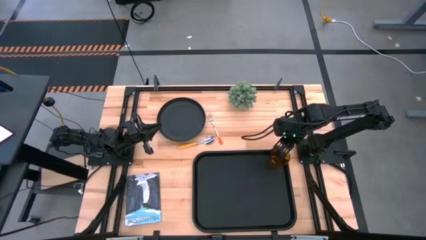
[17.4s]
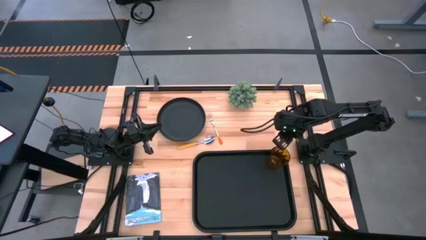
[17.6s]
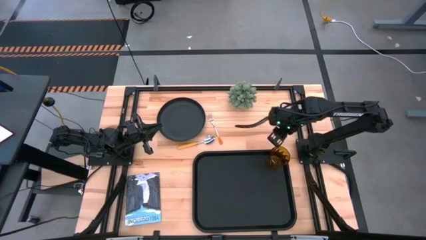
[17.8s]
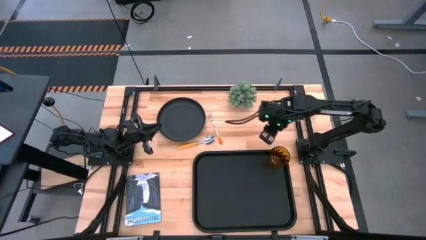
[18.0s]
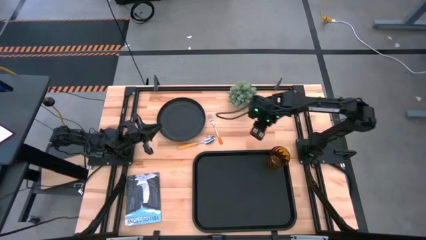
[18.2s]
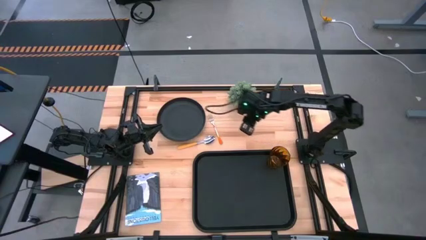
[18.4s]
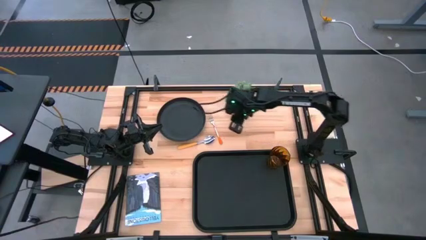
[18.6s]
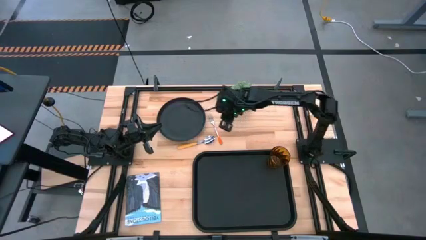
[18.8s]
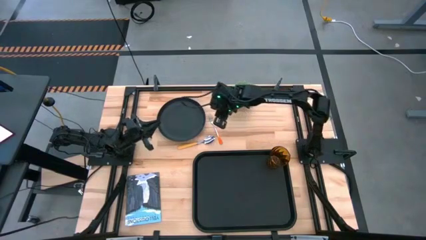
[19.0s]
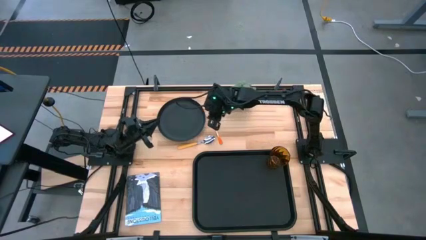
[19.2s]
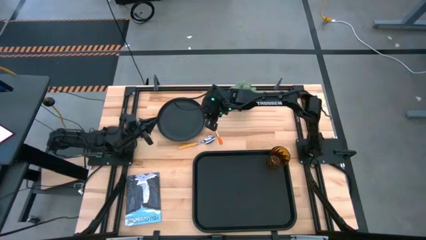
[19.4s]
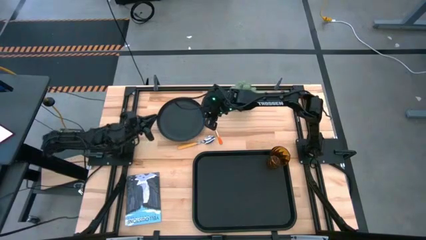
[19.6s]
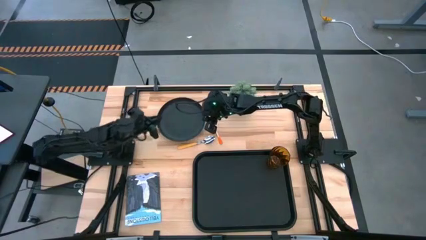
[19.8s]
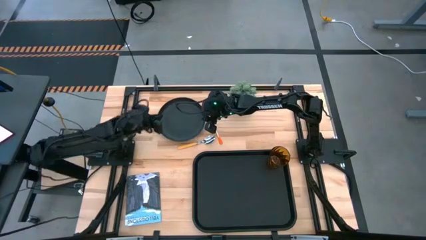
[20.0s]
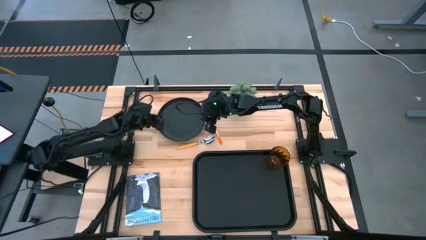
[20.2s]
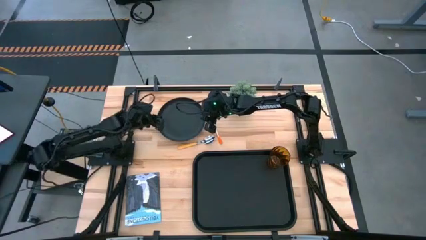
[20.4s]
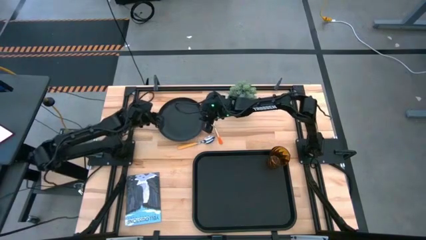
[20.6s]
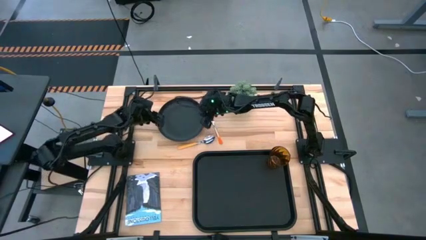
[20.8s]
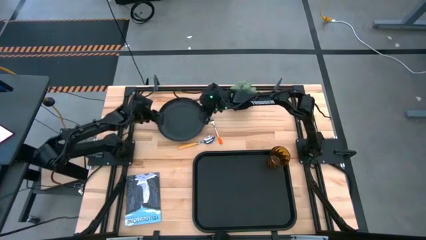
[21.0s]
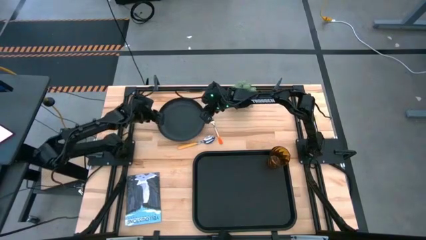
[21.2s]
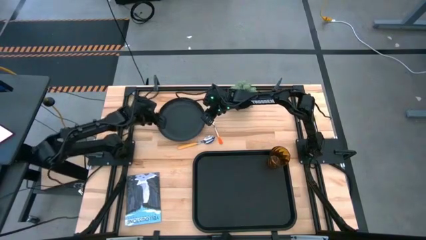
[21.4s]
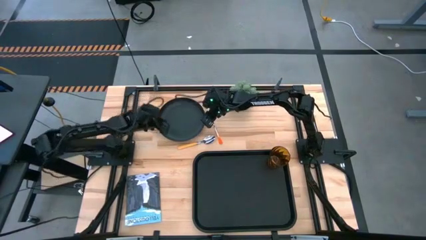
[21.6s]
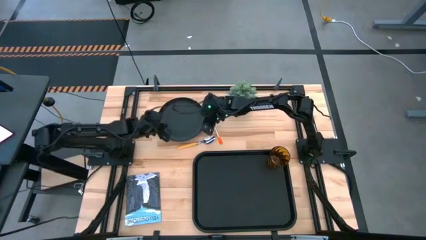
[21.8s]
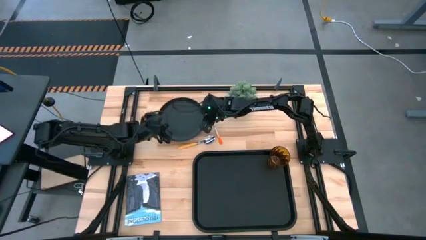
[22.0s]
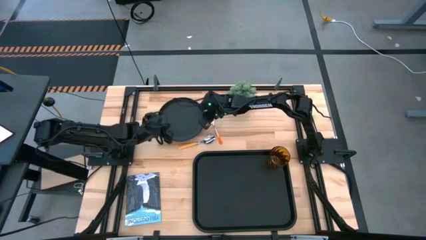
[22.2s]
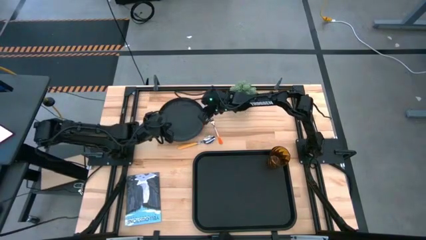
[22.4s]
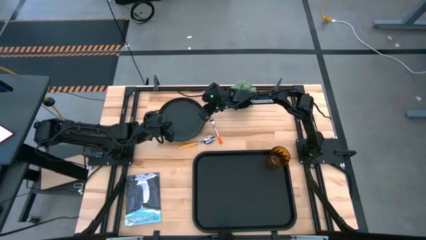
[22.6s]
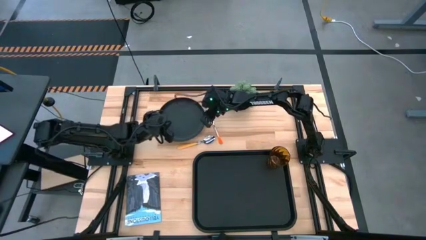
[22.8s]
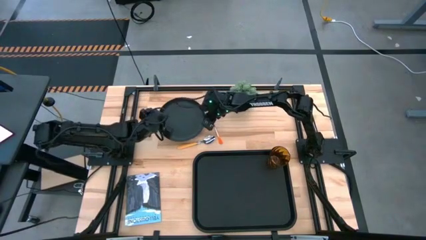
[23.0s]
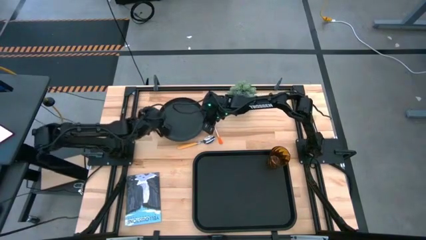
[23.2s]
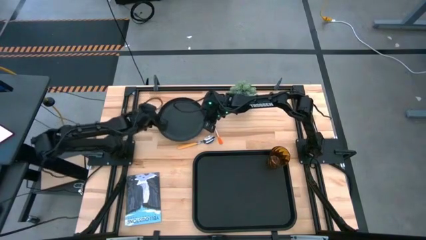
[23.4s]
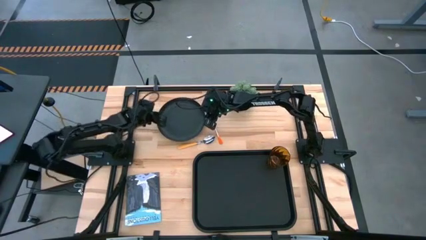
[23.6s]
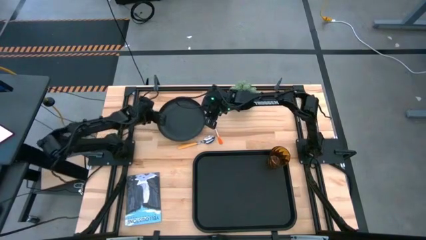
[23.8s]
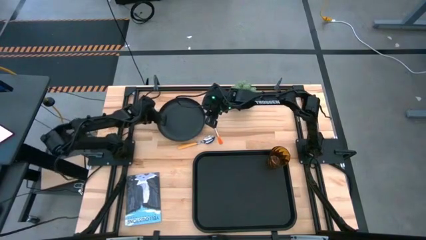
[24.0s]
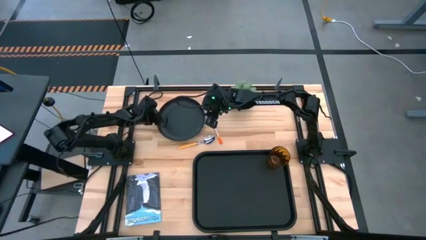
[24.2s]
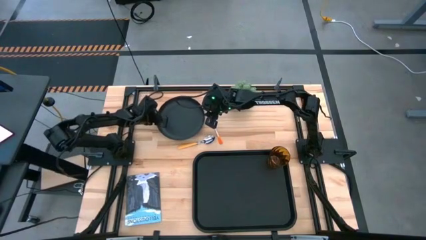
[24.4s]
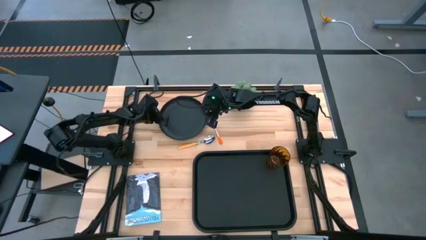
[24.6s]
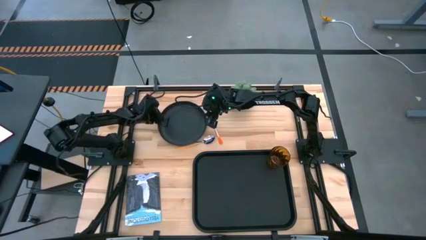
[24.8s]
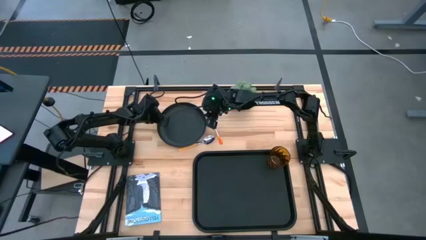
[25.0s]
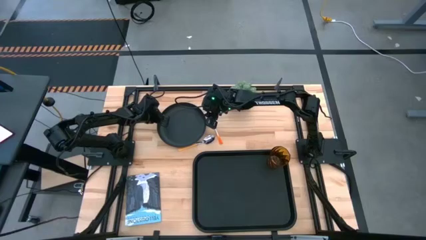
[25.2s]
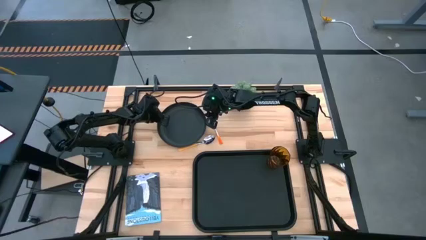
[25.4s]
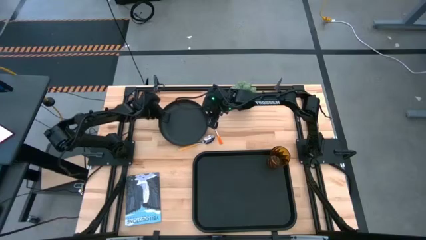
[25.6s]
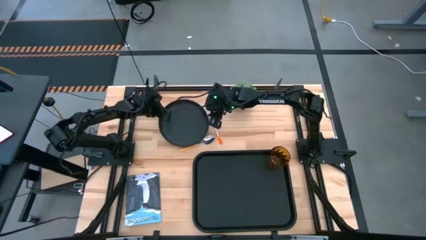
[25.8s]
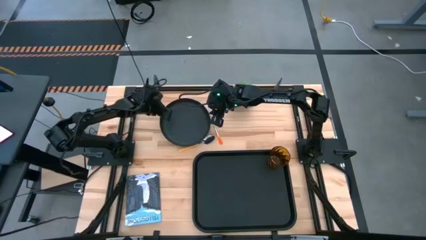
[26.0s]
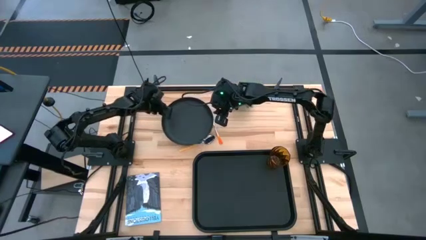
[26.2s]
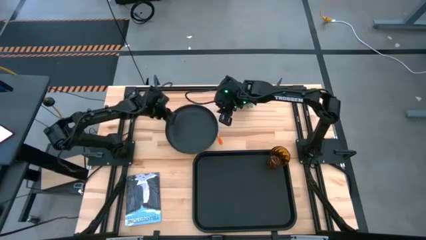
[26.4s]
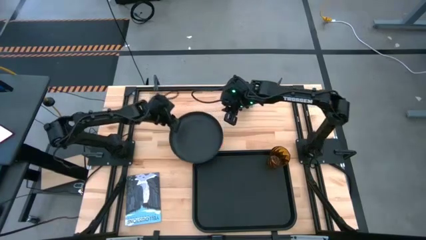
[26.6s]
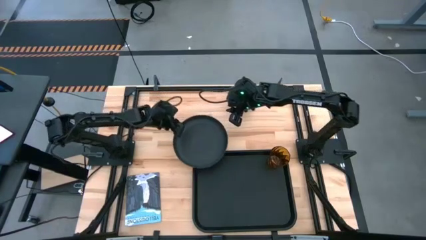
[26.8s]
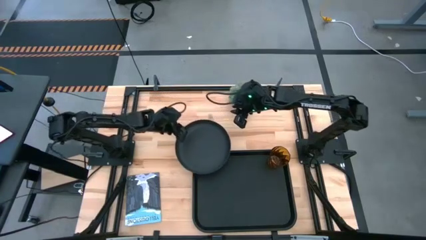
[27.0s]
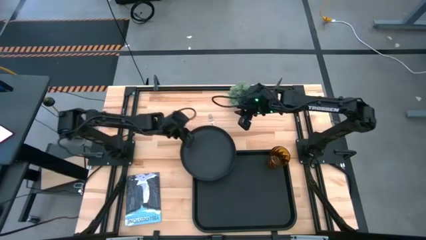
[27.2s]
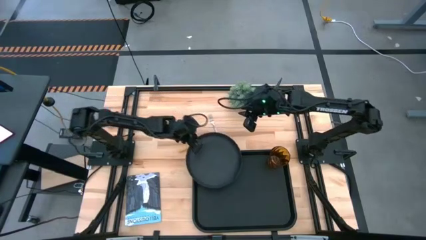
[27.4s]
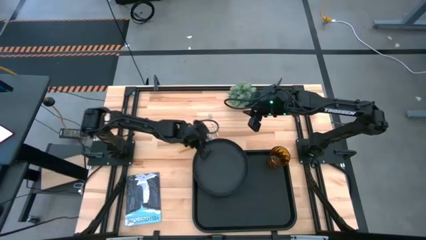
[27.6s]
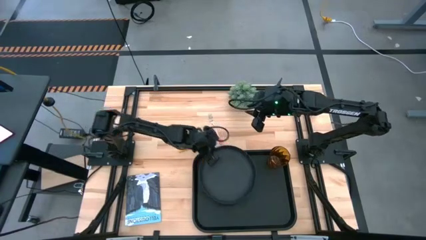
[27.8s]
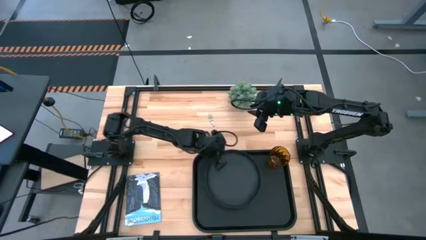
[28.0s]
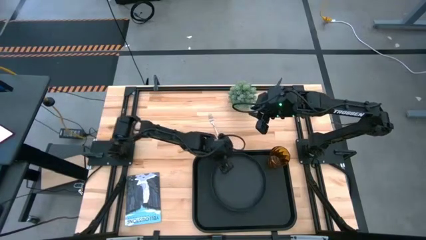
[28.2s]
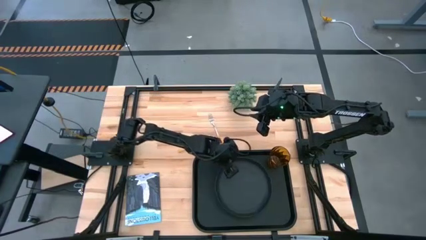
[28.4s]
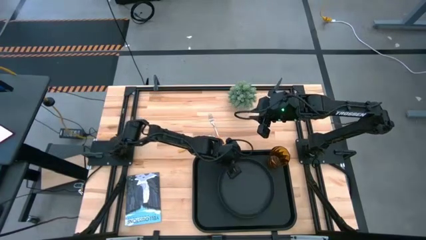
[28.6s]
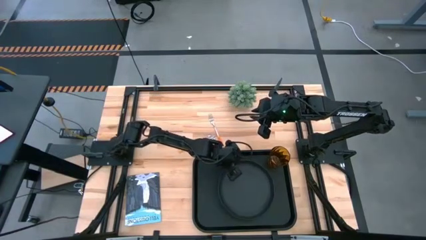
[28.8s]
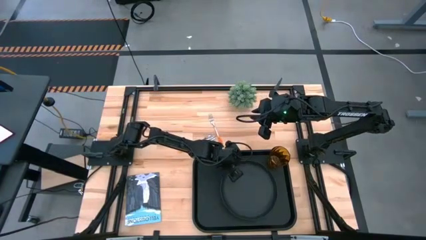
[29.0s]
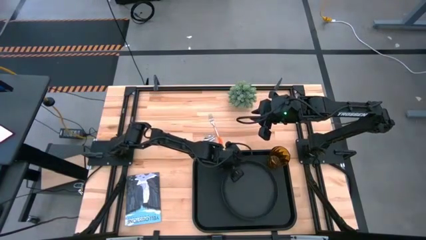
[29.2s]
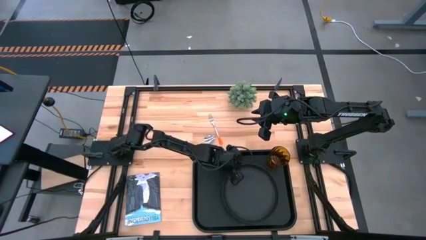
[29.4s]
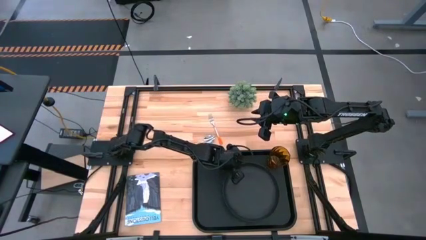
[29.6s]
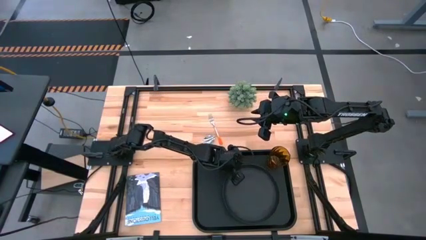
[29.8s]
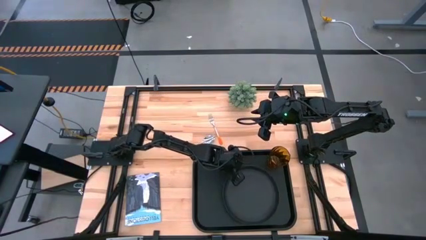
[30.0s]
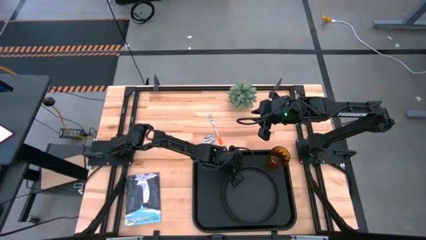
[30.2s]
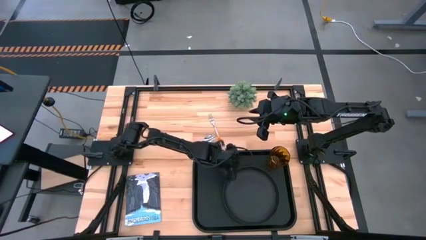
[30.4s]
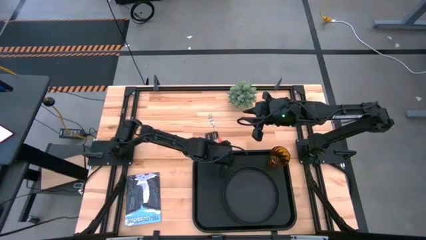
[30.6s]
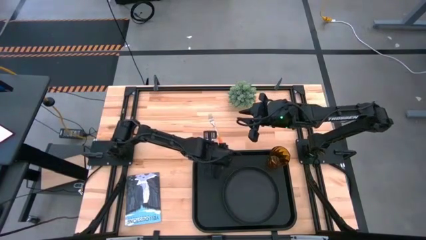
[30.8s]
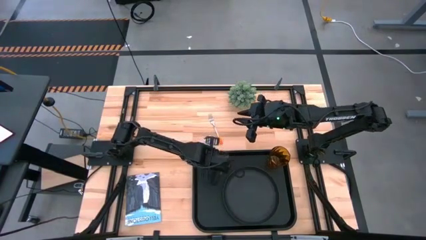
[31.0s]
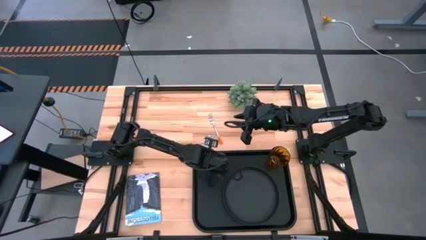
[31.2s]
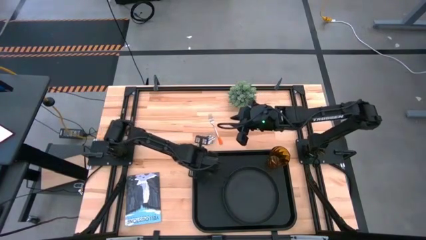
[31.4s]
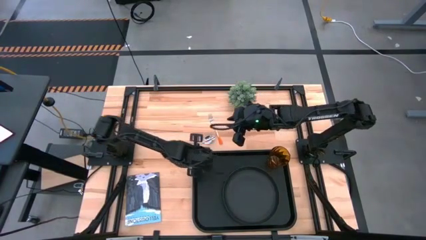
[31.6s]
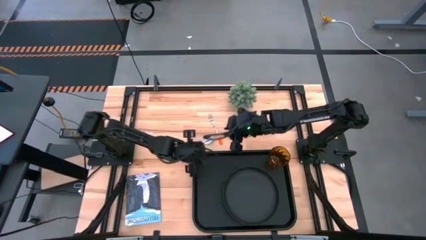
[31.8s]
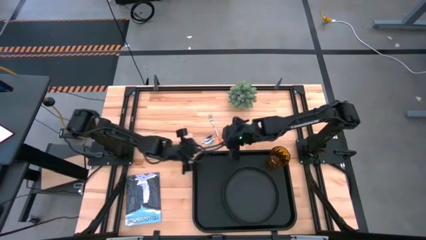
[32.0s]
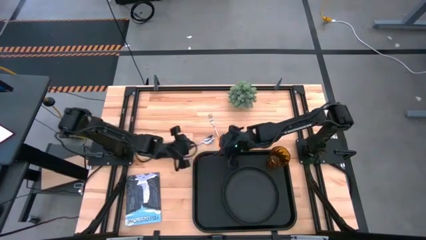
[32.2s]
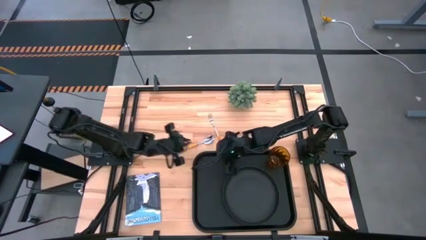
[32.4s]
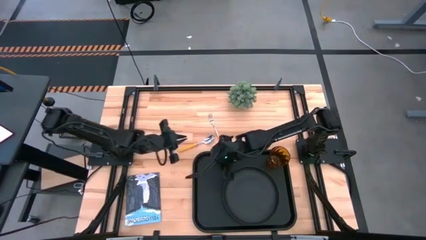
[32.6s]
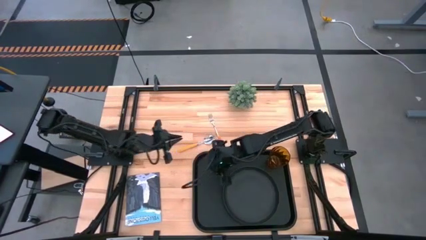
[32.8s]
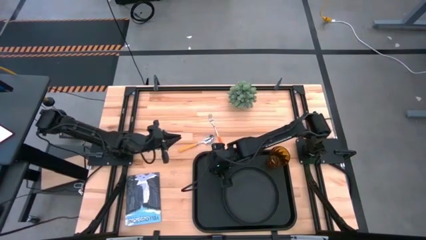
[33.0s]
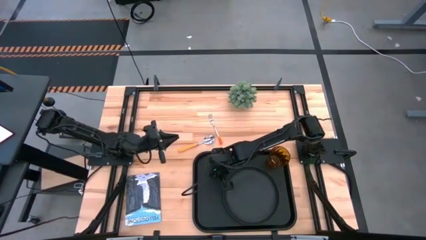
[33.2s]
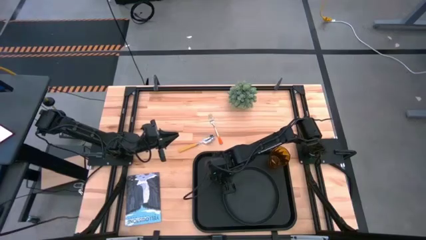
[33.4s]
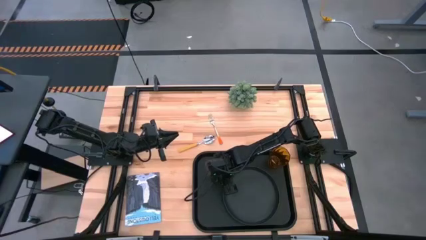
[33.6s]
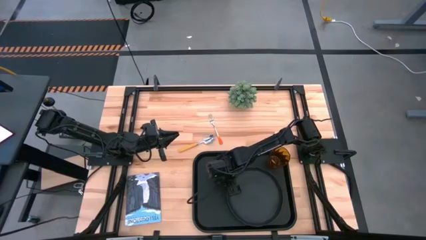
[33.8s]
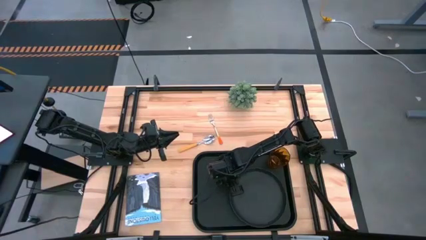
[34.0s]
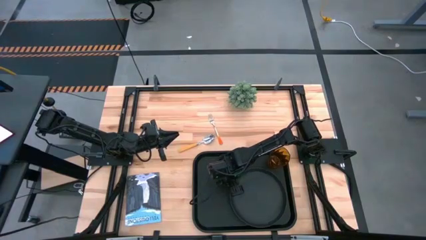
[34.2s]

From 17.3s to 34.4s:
Task: Pick and place plate/cup/fork/spoon on tray
Put the black plate on the bottom right of the black tray
